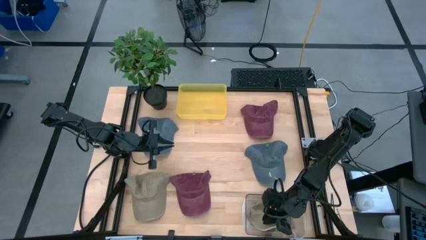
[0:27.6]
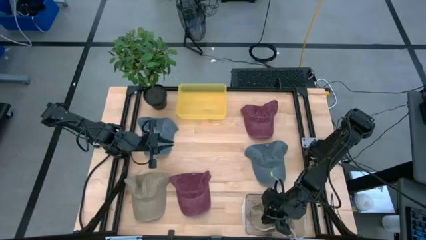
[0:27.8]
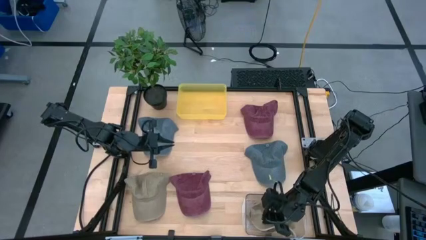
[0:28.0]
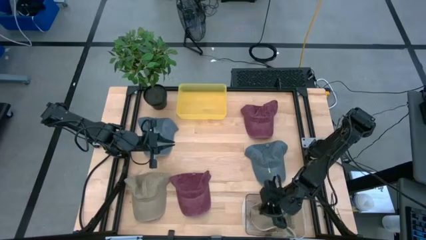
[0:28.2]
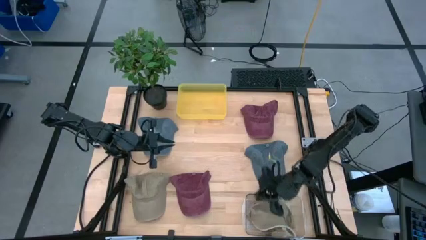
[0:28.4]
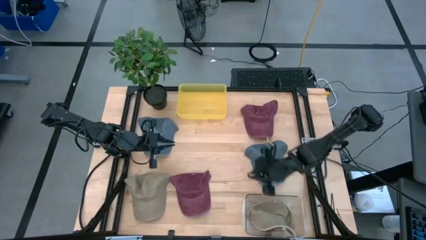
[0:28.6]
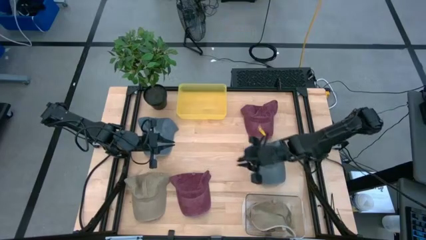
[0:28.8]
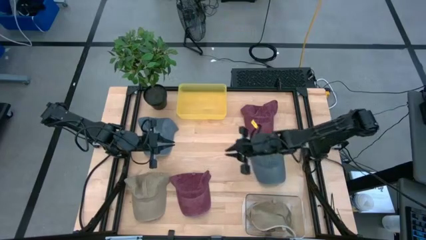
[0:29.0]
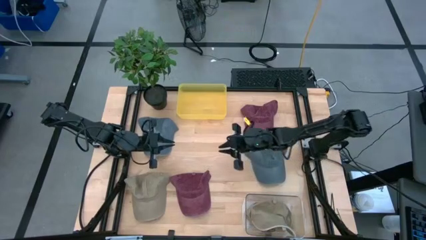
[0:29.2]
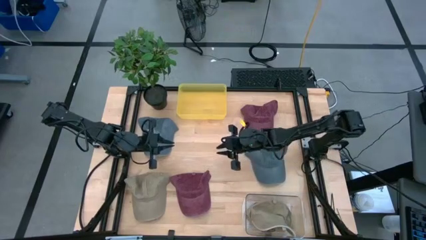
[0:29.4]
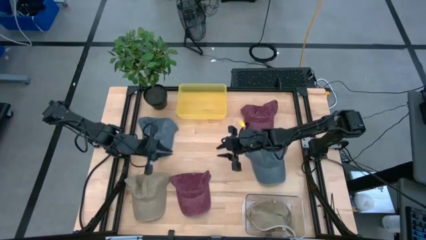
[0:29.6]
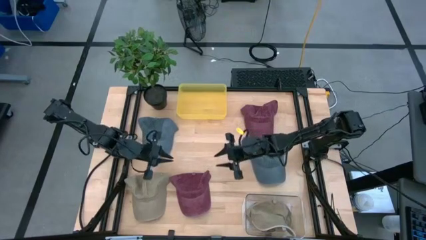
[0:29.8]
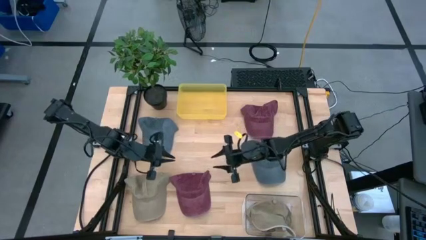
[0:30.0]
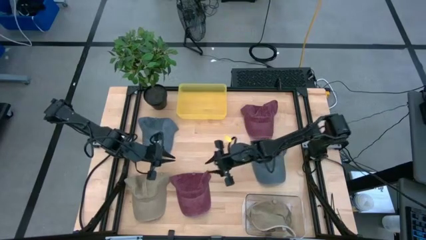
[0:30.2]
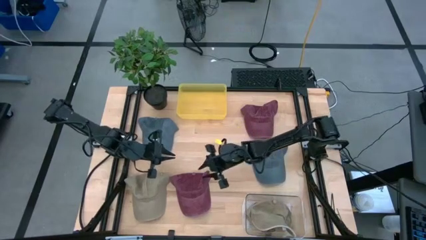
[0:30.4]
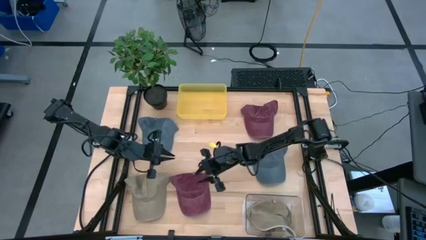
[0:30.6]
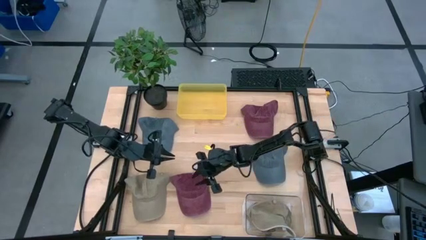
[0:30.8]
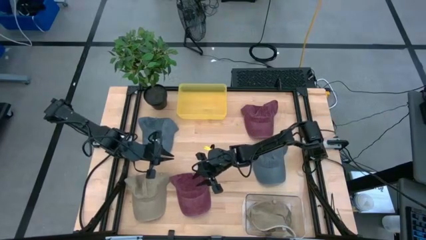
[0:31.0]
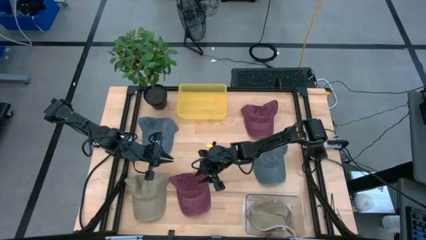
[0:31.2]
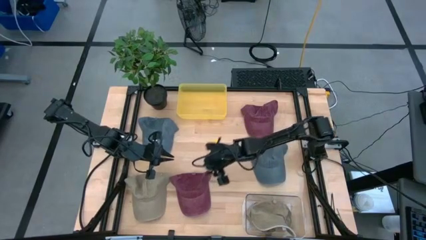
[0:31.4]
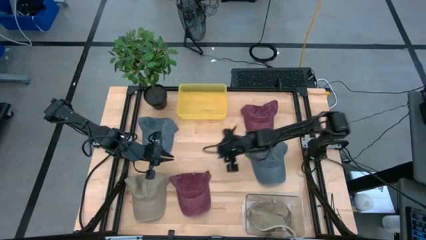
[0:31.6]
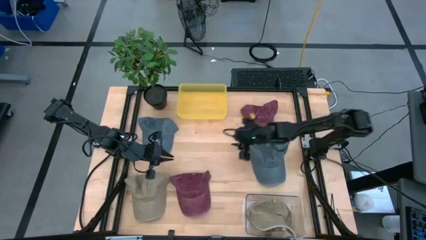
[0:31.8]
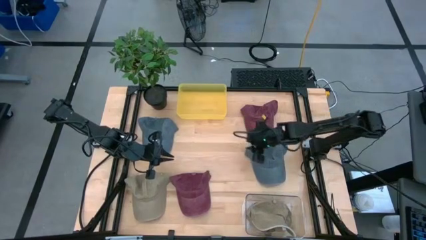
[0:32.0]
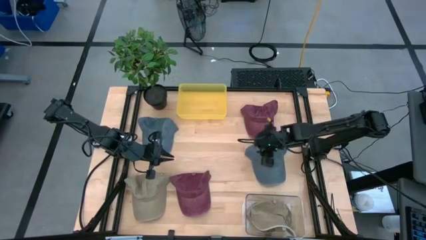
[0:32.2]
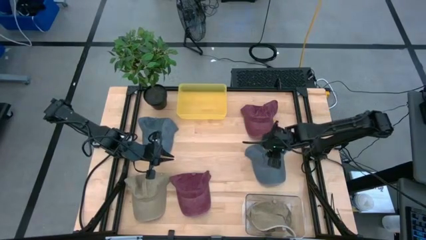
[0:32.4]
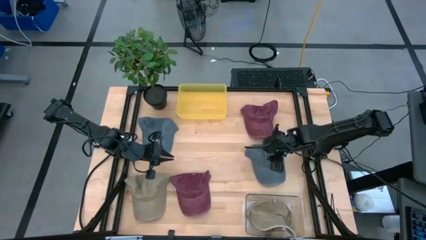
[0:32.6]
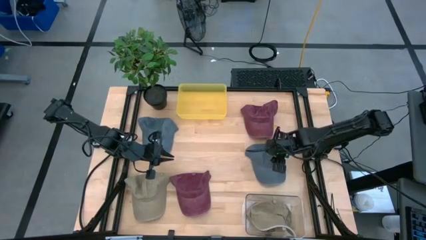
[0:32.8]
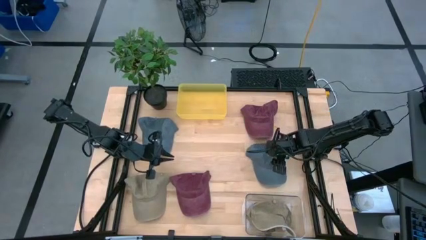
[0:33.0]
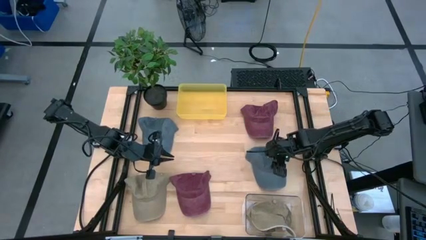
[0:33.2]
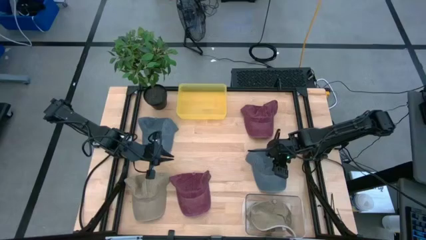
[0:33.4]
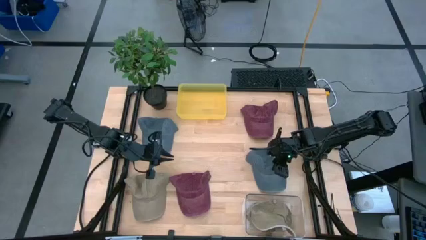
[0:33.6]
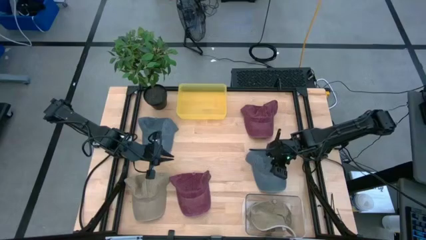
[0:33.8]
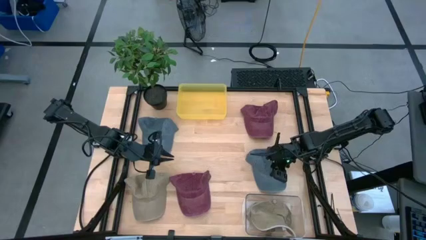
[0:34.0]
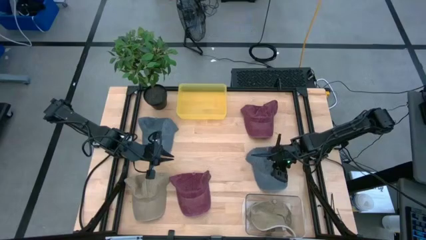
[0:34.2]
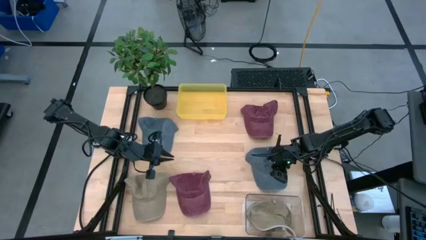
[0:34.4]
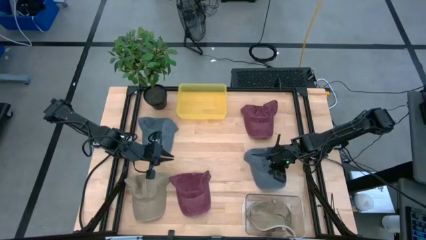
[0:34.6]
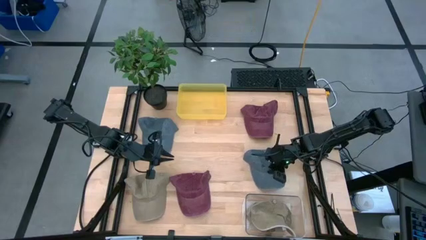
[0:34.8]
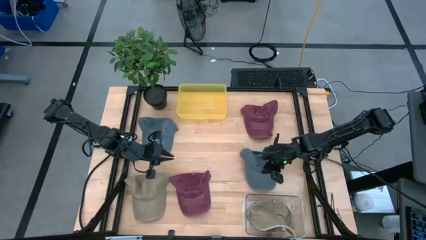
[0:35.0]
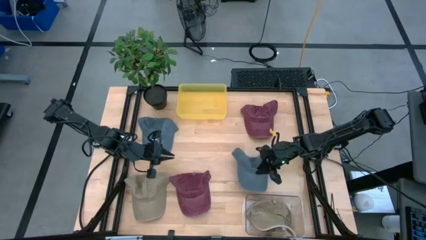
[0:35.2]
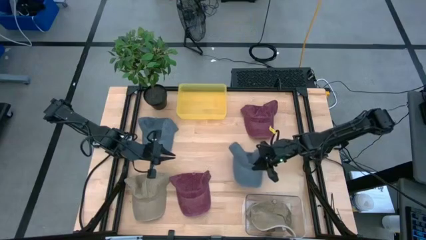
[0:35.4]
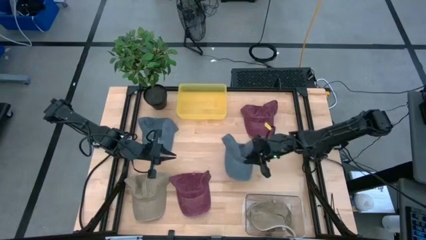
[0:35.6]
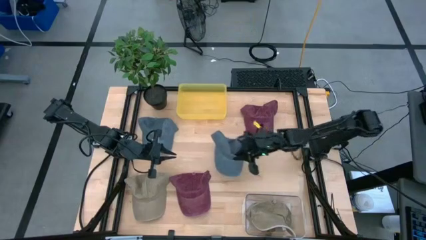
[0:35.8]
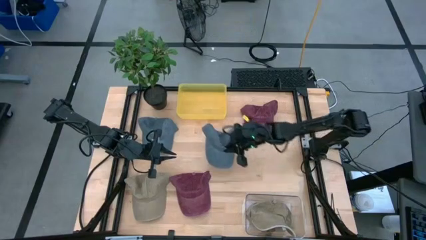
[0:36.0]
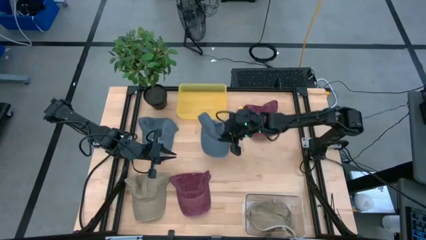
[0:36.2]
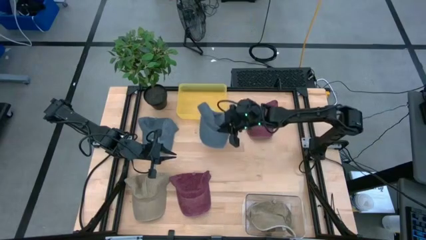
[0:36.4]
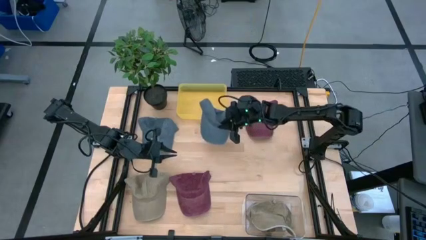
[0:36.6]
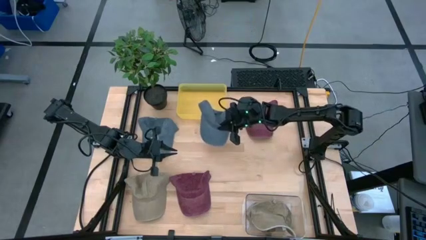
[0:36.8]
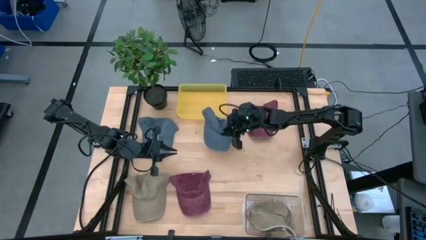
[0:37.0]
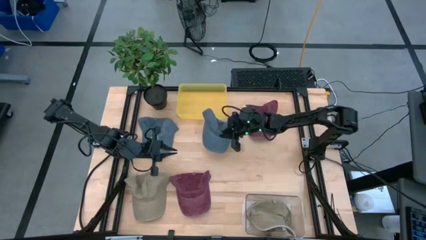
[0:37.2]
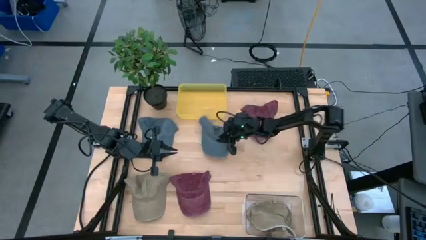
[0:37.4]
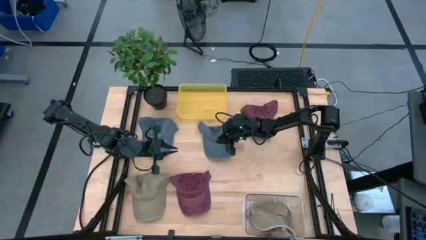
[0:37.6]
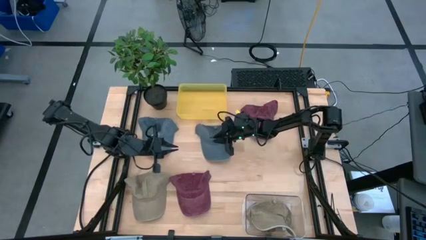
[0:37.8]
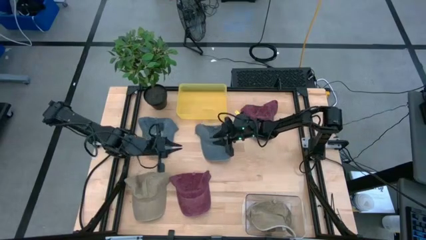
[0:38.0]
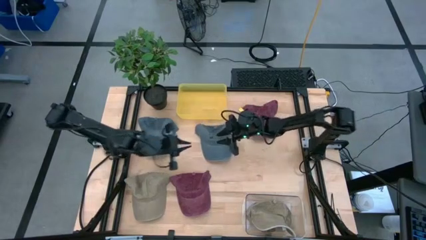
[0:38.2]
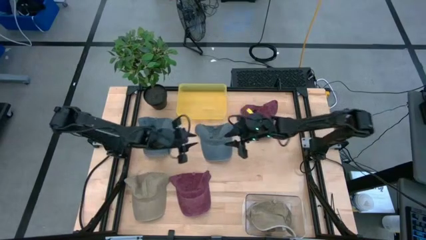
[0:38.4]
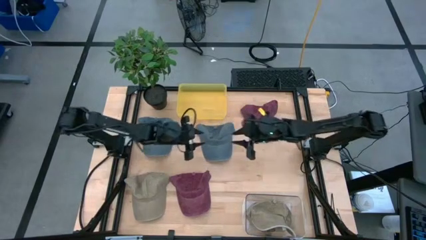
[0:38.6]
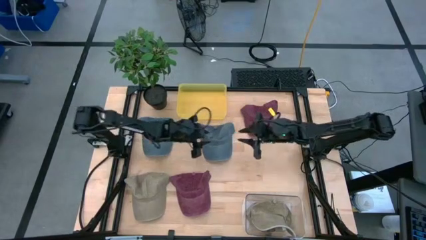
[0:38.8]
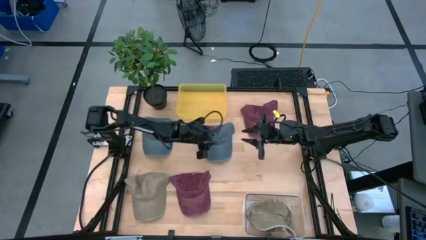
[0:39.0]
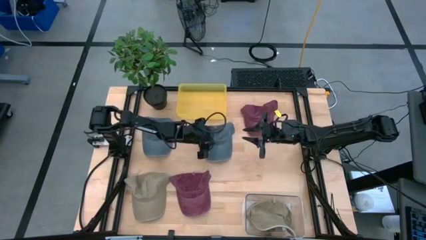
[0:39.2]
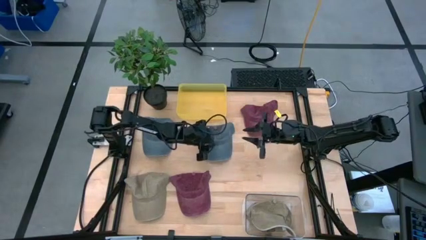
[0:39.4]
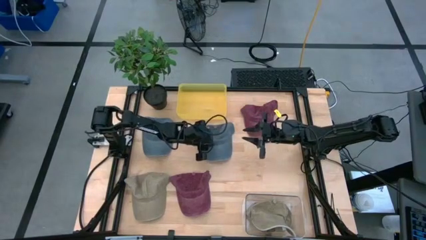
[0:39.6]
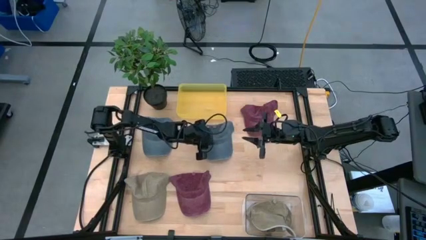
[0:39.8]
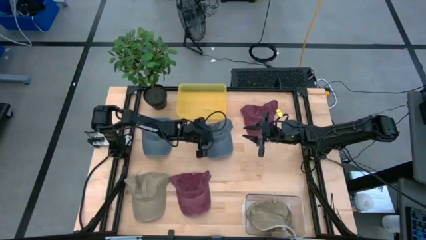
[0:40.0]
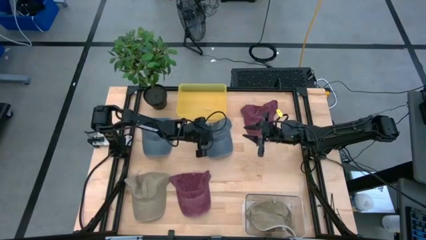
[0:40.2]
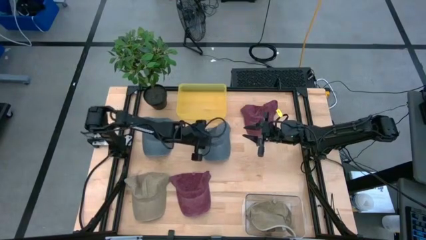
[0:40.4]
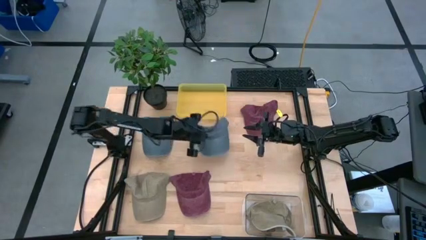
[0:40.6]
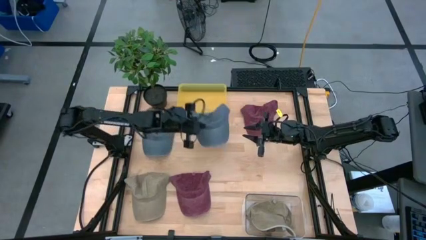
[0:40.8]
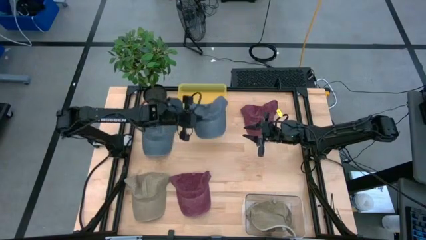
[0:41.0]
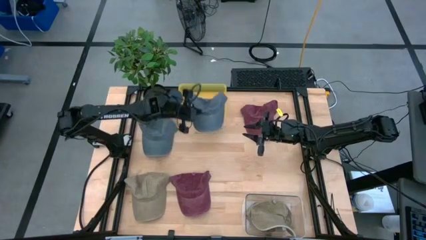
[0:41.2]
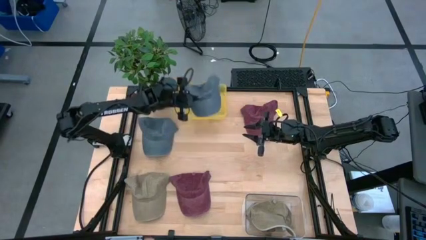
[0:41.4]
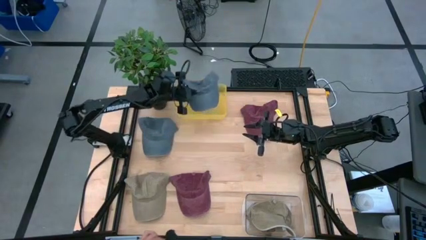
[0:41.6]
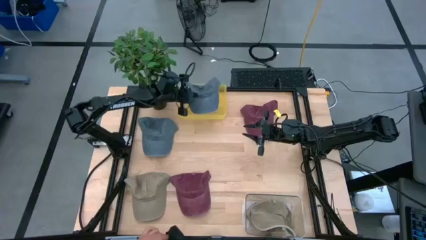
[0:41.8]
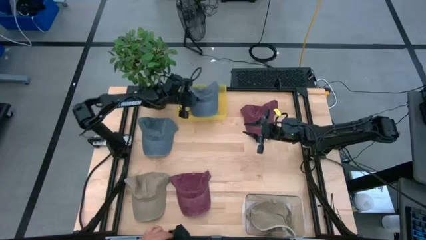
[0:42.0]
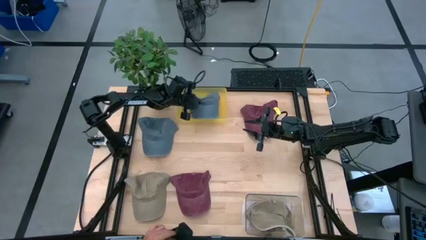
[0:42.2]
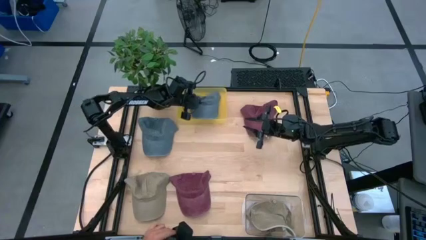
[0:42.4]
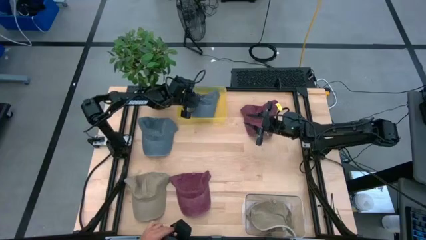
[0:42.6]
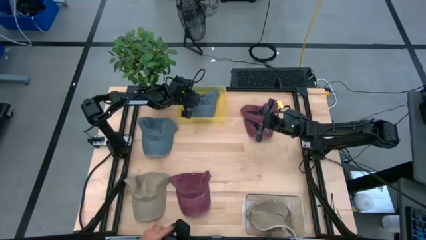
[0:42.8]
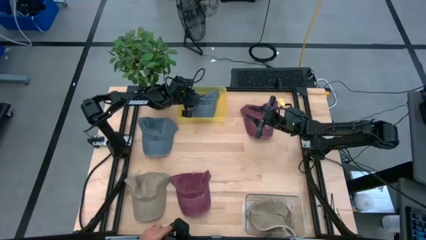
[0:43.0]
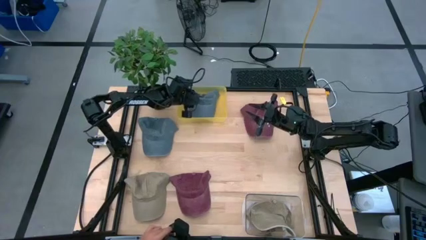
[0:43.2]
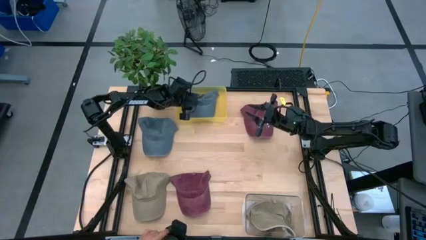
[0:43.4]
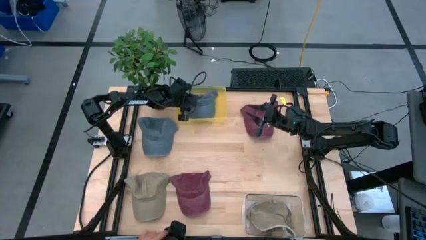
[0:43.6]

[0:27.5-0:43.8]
Task: Pick & Place hat
Put the right blue cap into the yellow bin
